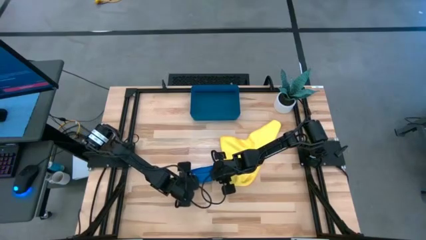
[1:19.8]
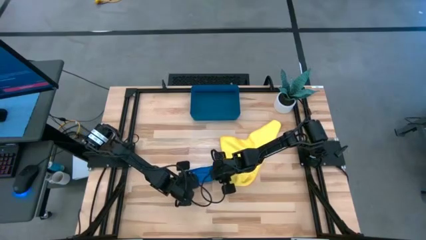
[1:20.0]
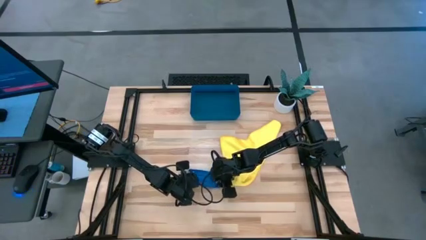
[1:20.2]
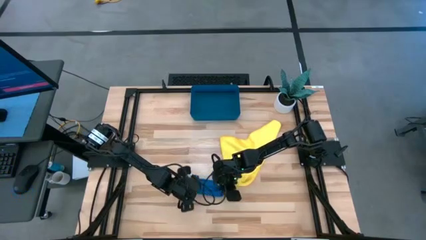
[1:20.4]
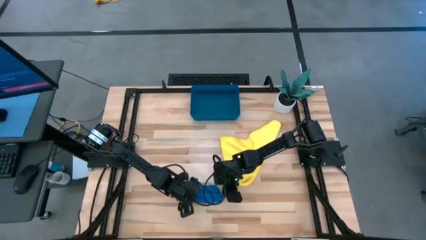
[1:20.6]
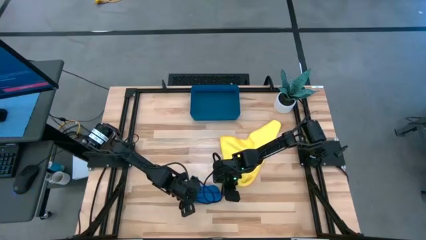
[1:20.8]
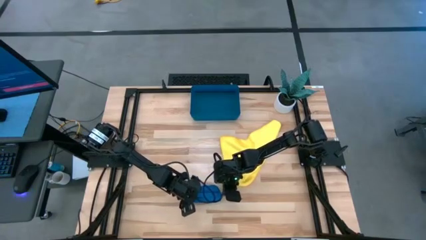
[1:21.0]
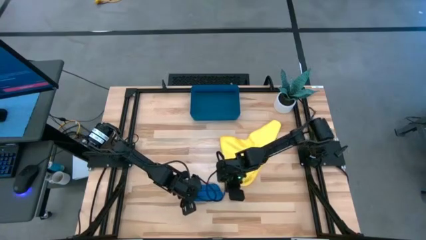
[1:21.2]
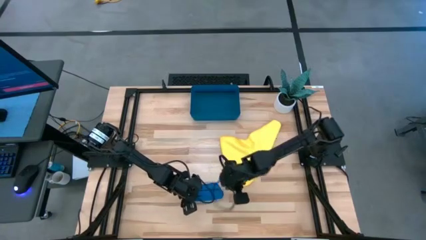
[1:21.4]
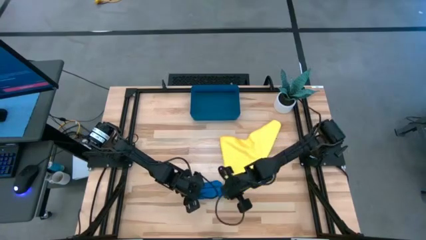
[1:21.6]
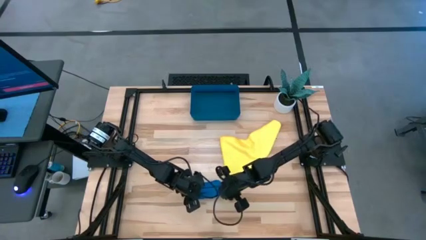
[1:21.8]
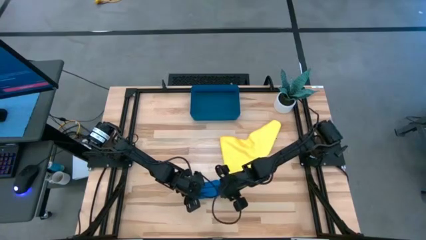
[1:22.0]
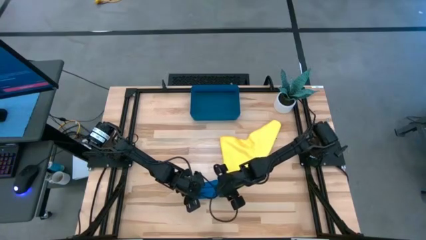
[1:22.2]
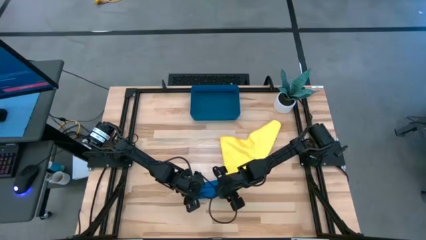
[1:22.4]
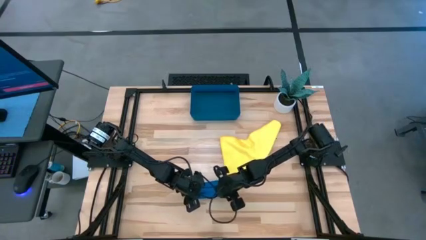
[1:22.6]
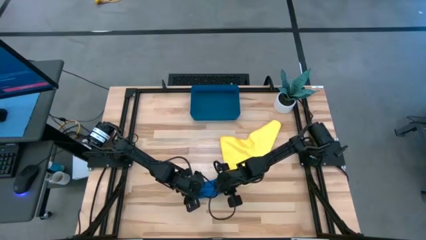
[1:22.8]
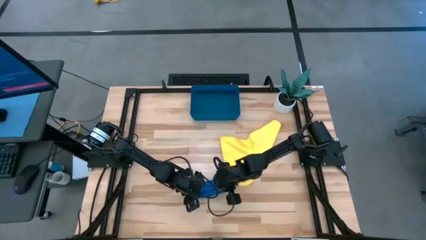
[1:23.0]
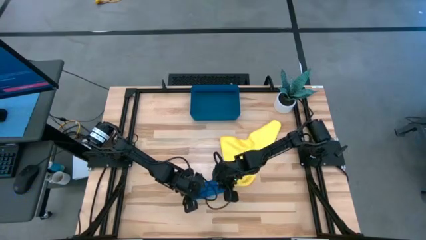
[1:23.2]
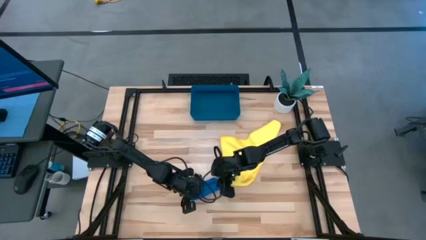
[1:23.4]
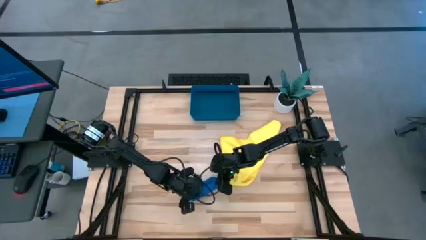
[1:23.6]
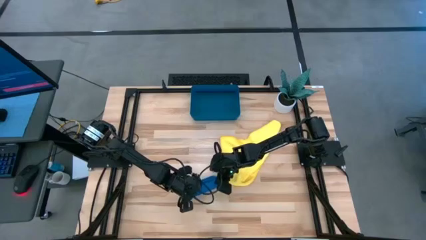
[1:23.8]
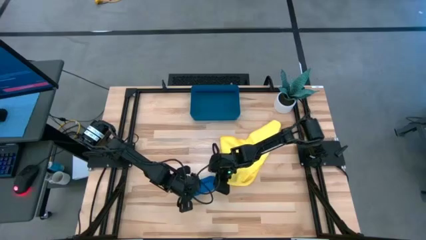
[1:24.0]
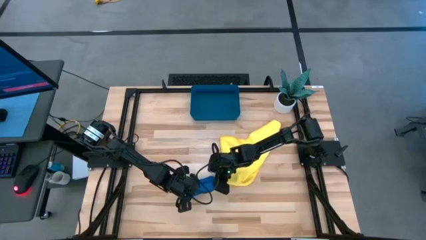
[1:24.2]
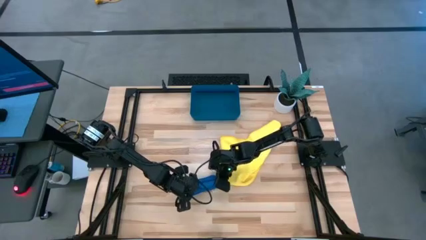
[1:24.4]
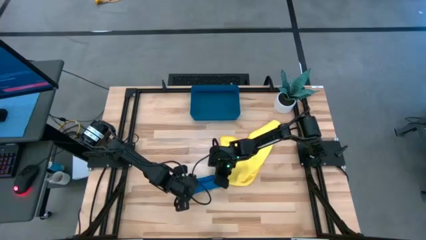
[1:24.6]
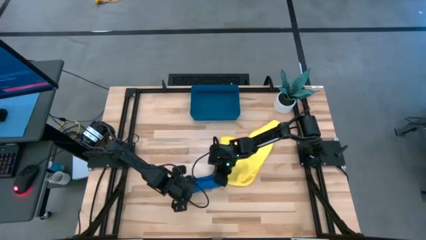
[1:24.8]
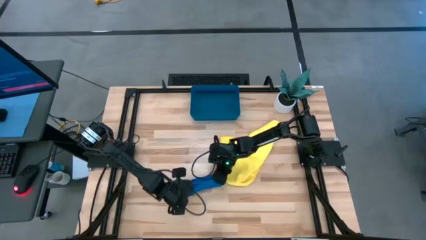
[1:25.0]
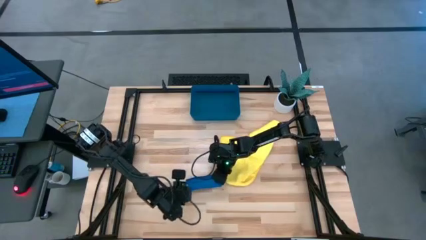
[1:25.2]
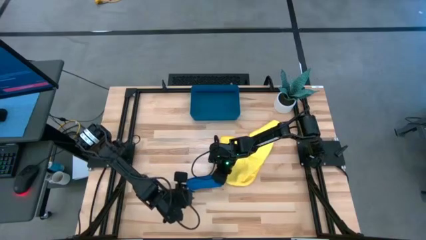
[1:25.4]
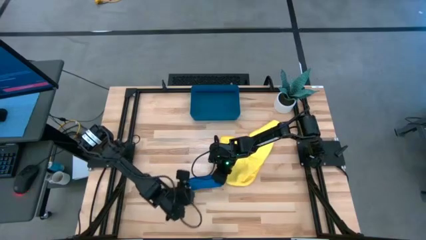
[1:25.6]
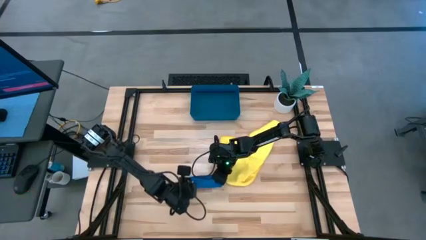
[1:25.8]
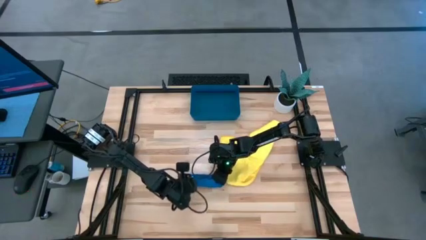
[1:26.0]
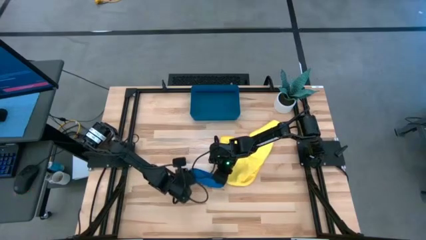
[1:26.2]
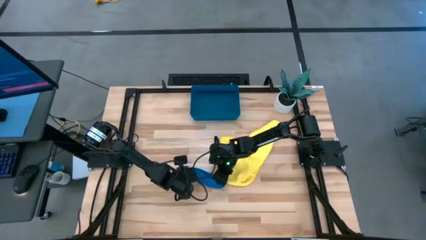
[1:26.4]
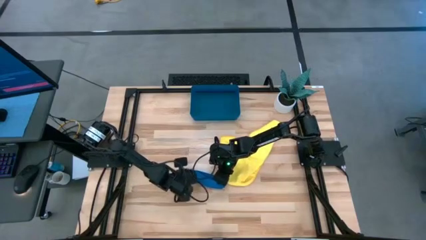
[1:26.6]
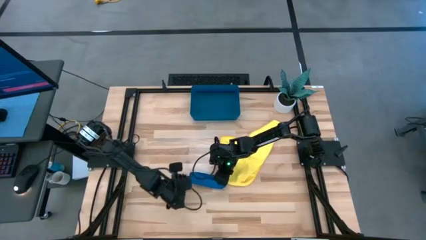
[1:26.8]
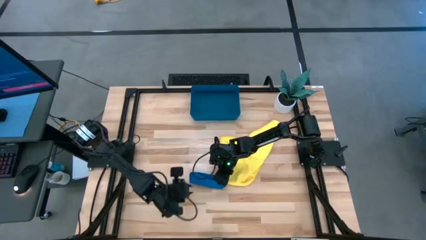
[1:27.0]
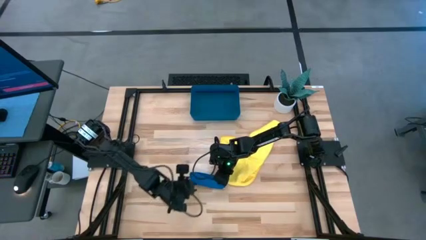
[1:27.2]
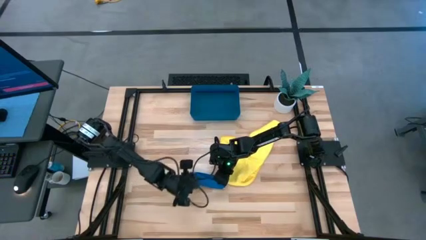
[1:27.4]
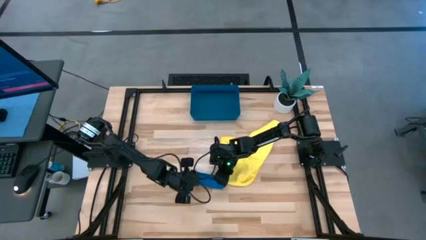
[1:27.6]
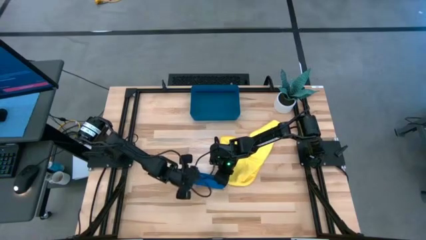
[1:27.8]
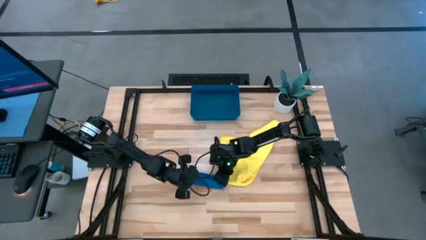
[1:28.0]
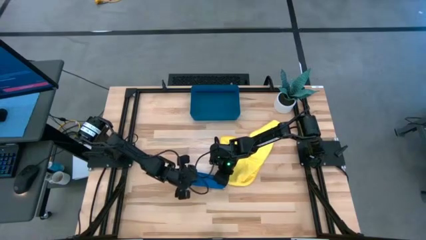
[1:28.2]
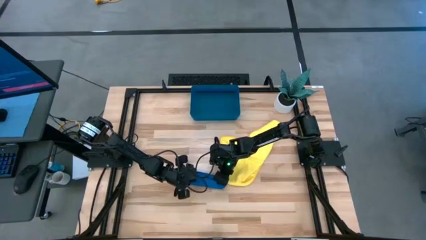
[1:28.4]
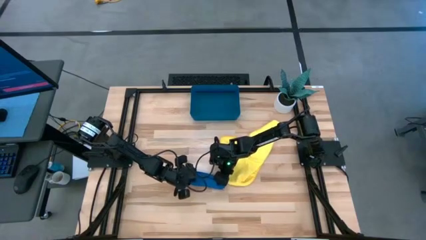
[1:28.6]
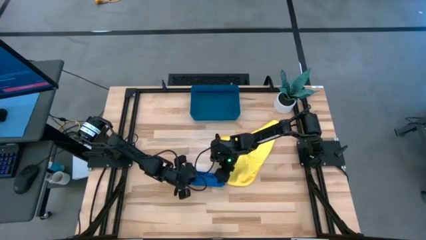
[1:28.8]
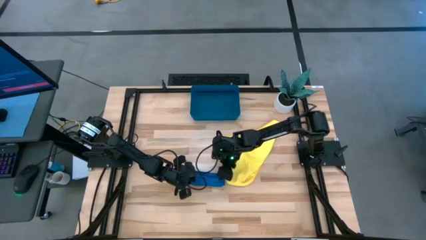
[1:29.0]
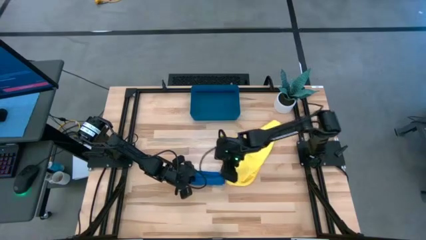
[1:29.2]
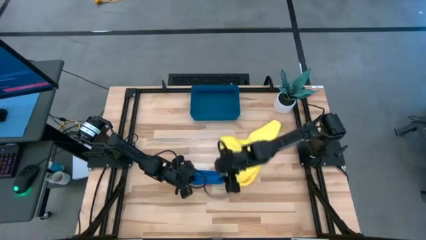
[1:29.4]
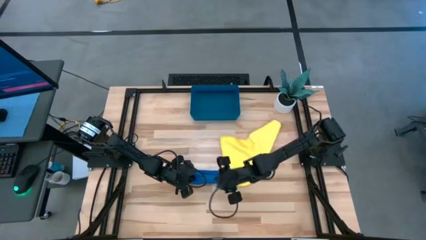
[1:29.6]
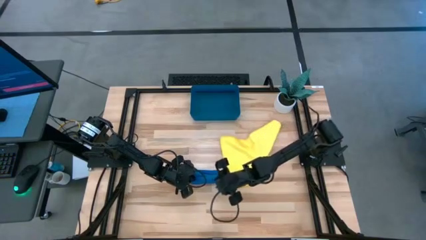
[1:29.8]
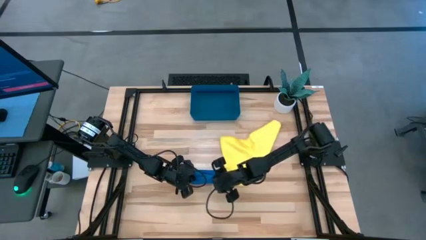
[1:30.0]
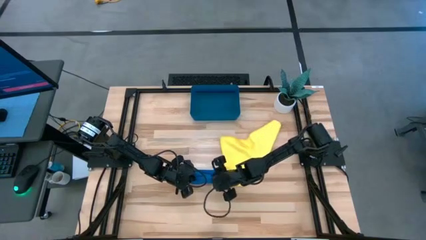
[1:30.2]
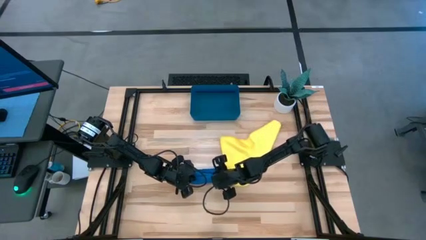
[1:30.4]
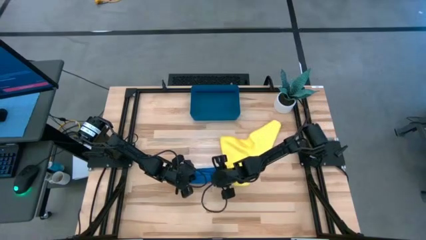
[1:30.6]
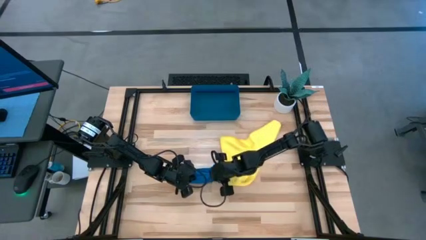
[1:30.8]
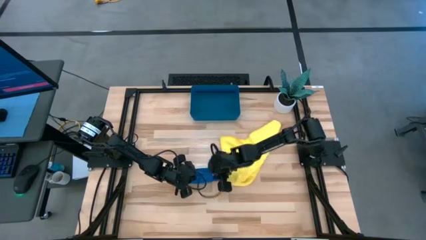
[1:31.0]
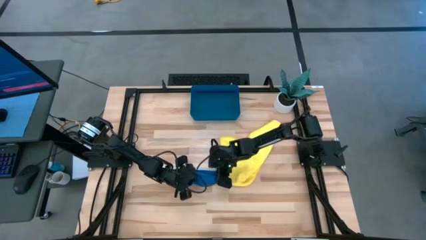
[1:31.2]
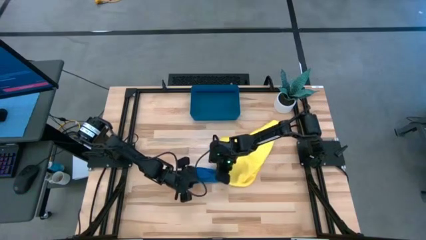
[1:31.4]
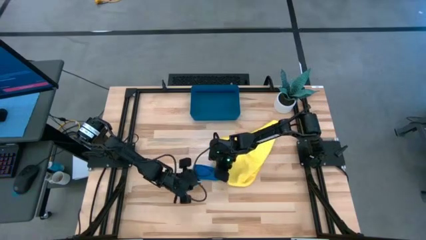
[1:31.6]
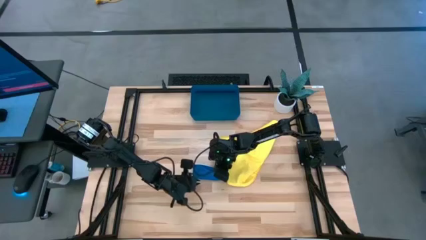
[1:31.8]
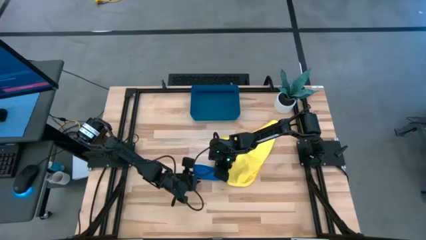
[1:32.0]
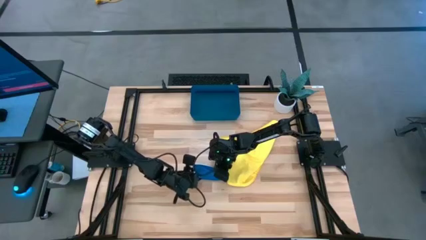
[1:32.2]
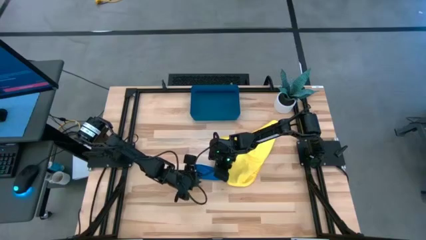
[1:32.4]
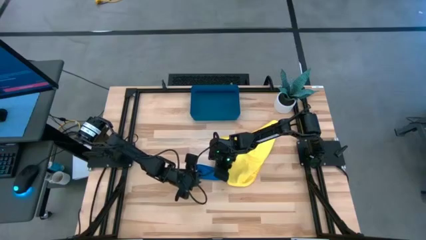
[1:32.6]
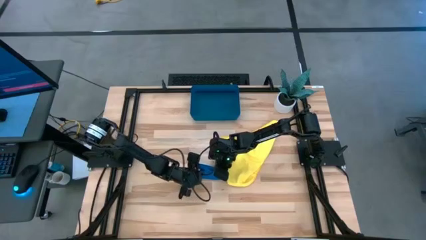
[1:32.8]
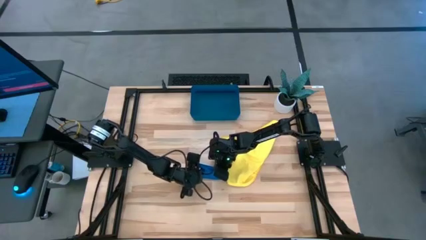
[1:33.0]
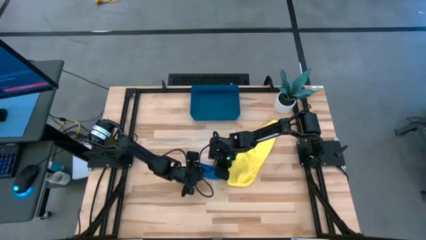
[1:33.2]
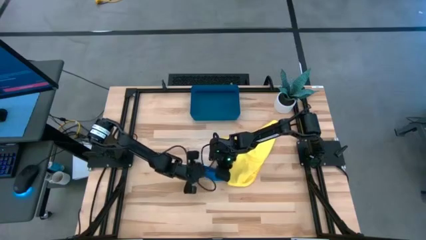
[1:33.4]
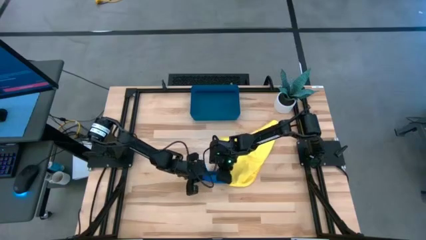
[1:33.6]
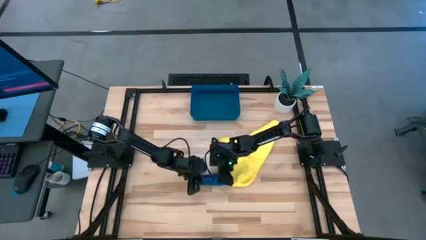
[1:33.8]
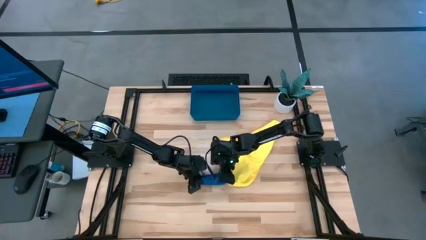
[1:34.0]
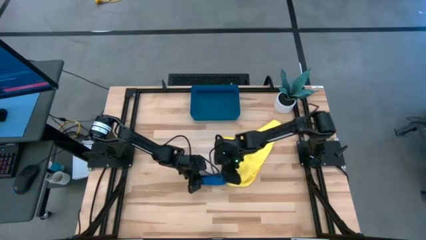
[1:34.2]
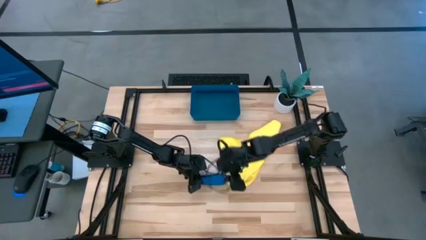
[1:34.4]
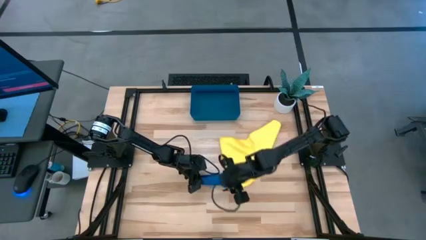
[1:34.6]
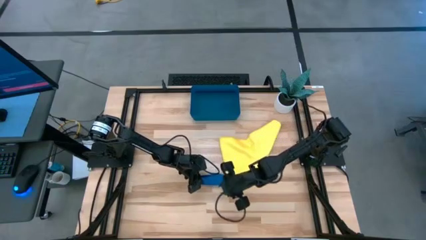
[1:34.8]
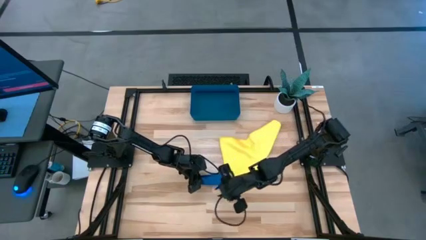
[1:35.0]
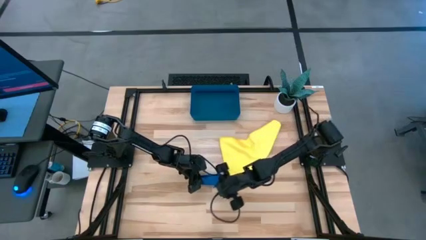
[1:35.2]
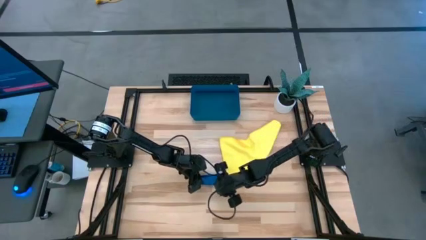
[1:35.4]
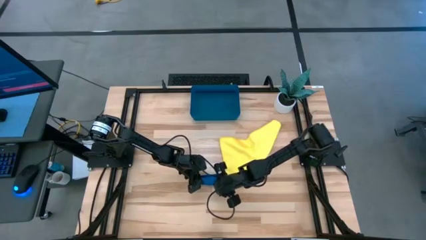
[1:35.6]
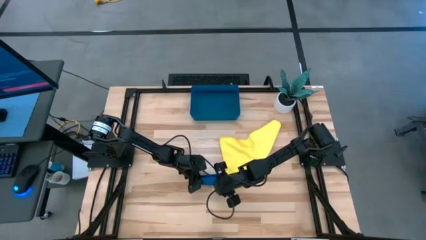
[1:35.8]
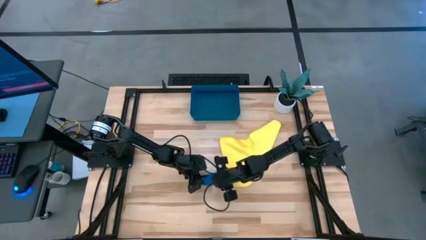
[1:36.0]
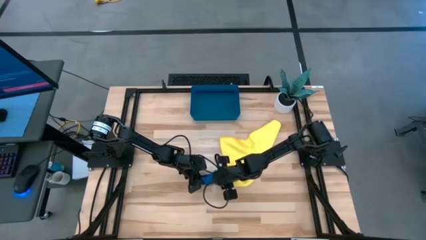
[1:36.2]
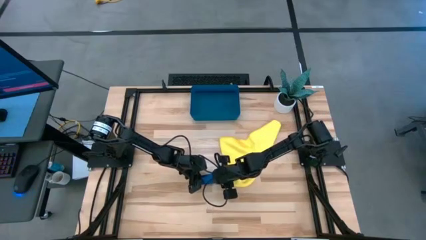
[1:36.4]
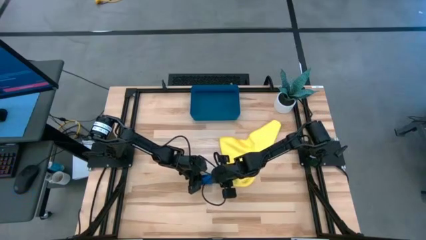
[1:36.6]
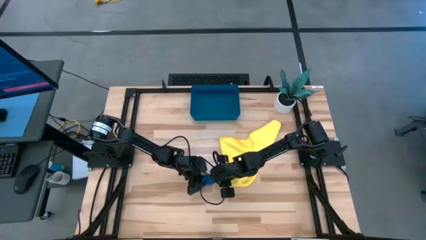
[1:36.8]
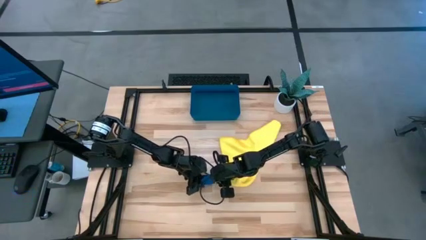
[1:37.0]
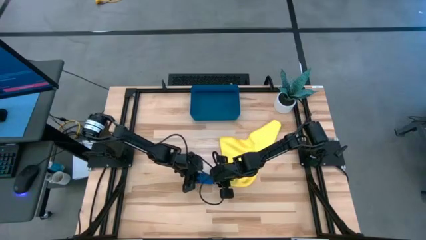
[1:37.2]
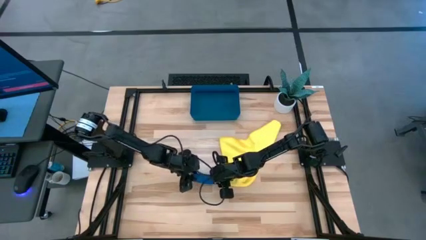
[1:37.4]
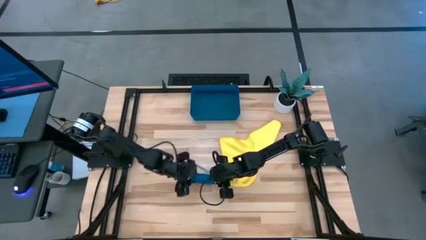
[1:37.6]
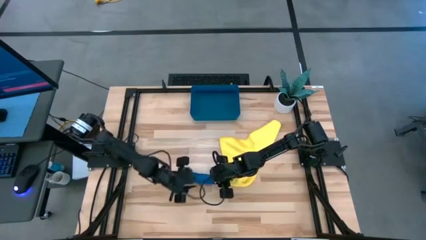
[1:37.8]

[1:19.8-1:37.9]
Task: Roll microfiber towels into tight, uniform cylinder then place into a basket
Roll the blue towel
